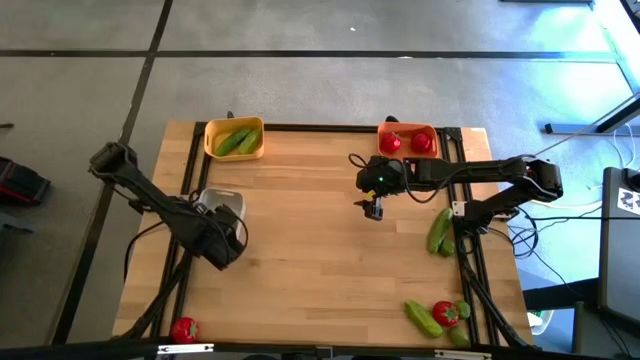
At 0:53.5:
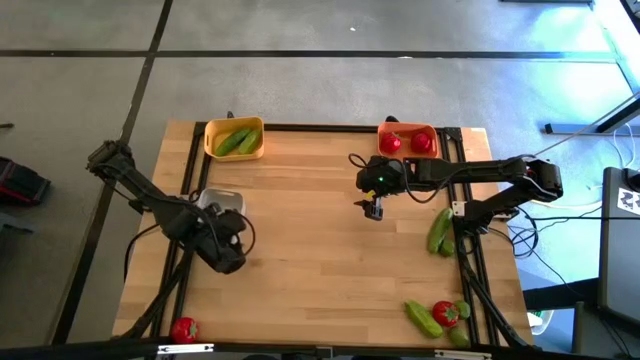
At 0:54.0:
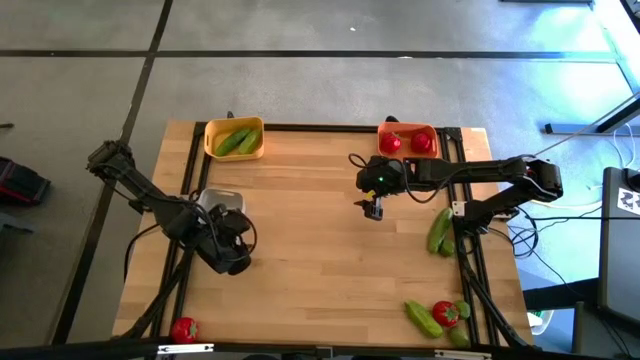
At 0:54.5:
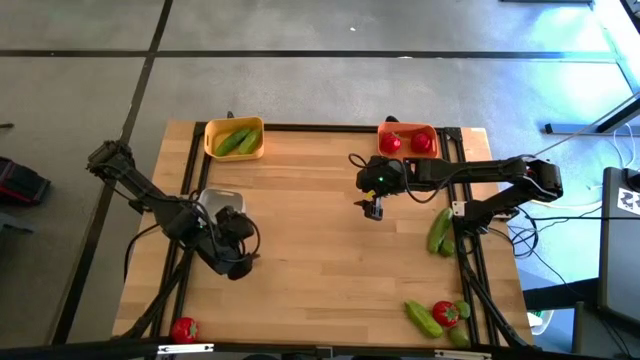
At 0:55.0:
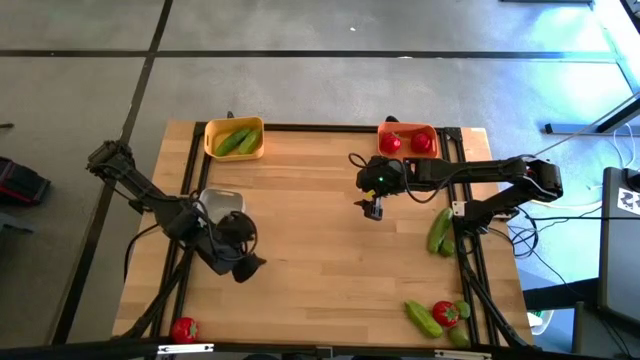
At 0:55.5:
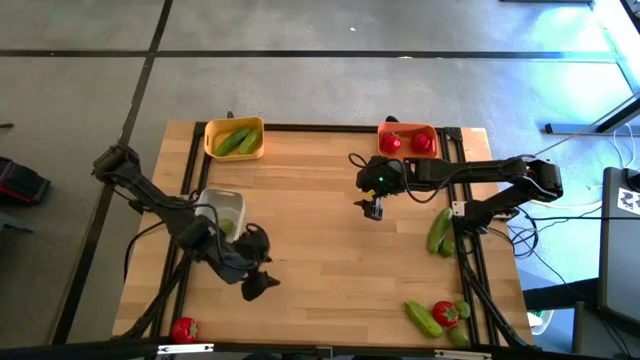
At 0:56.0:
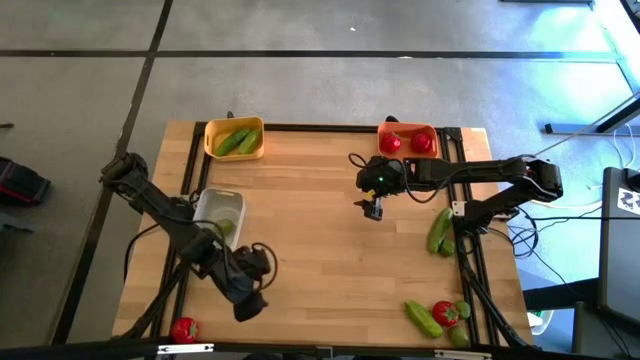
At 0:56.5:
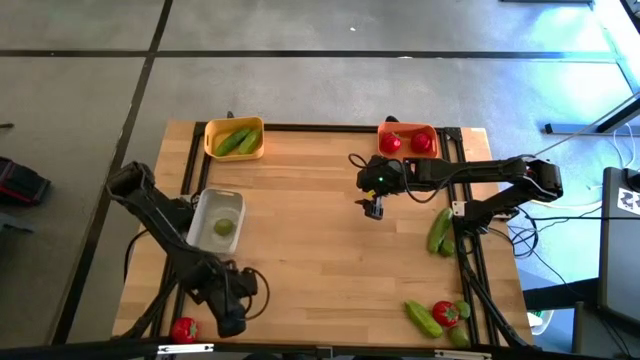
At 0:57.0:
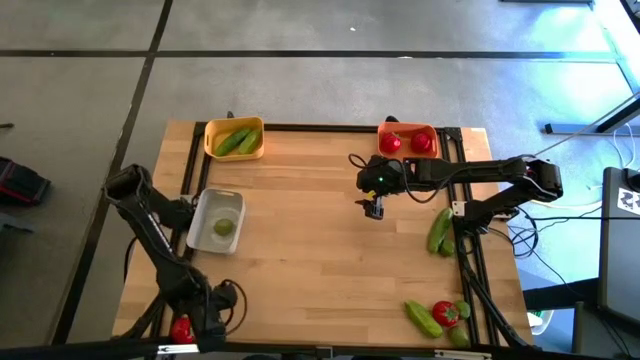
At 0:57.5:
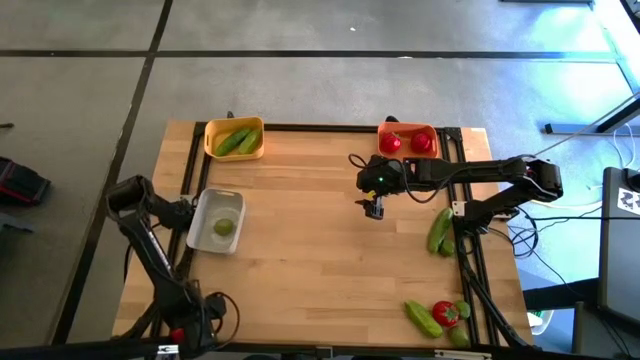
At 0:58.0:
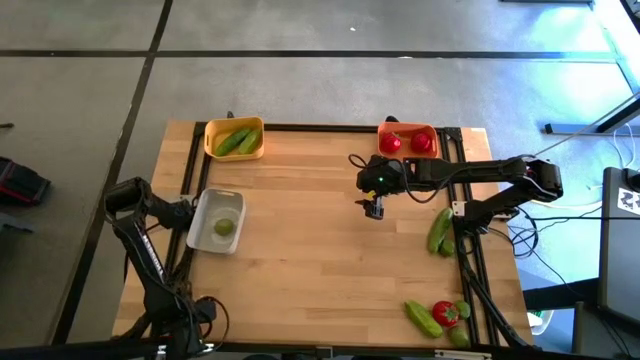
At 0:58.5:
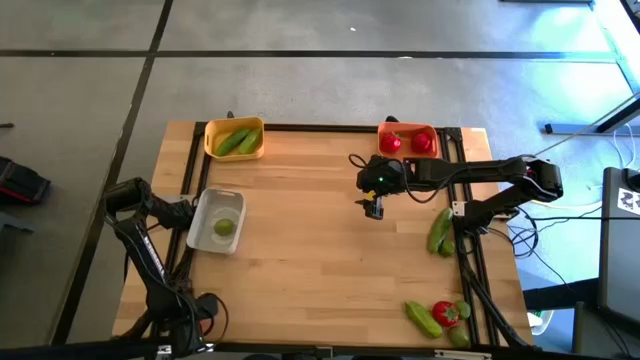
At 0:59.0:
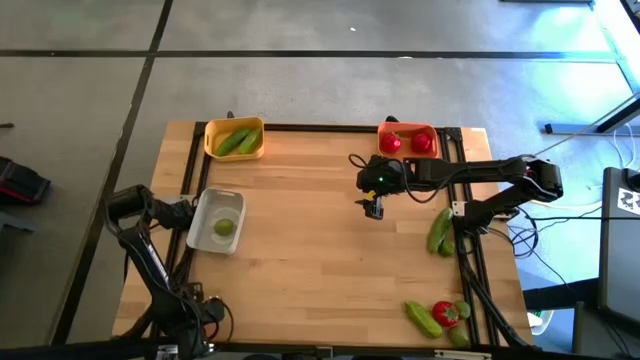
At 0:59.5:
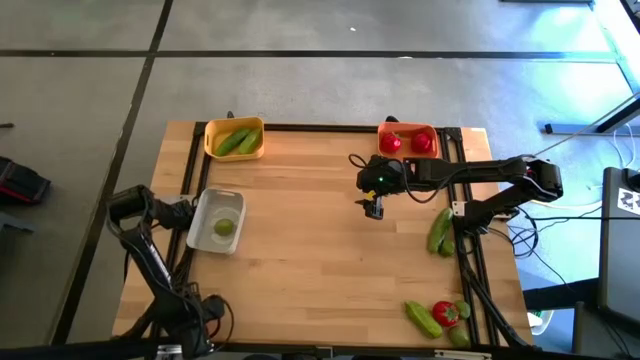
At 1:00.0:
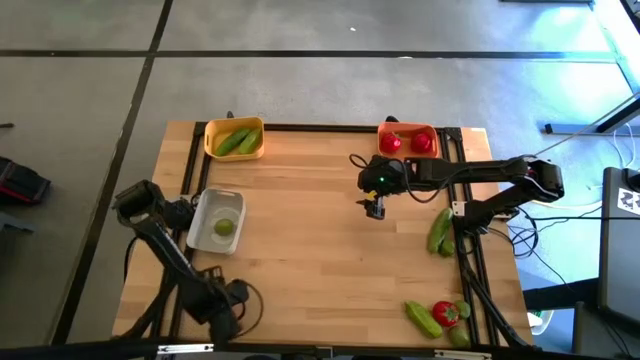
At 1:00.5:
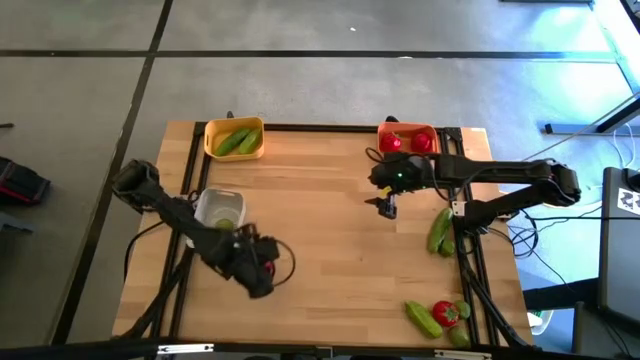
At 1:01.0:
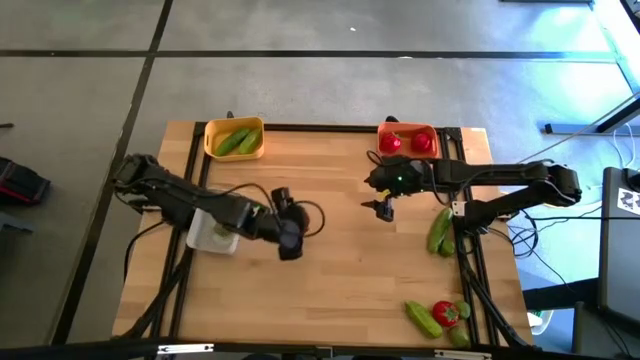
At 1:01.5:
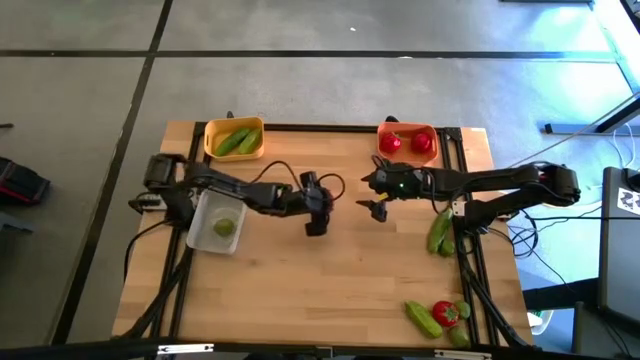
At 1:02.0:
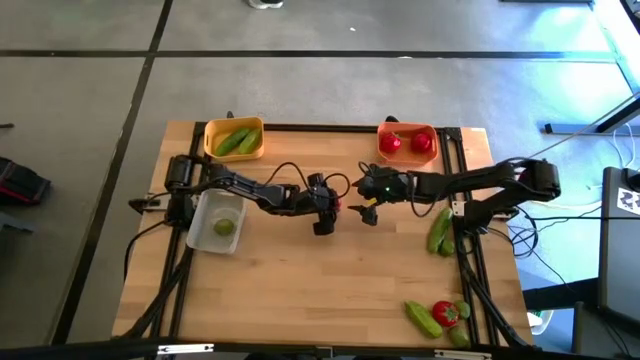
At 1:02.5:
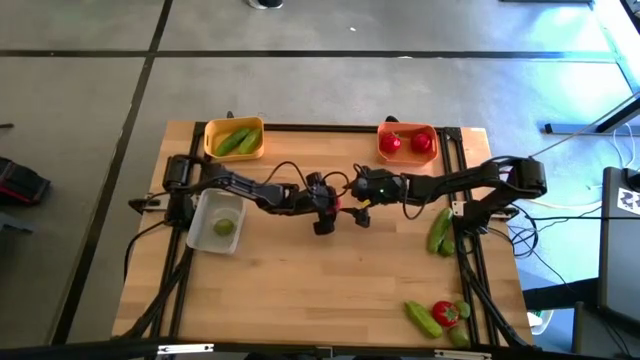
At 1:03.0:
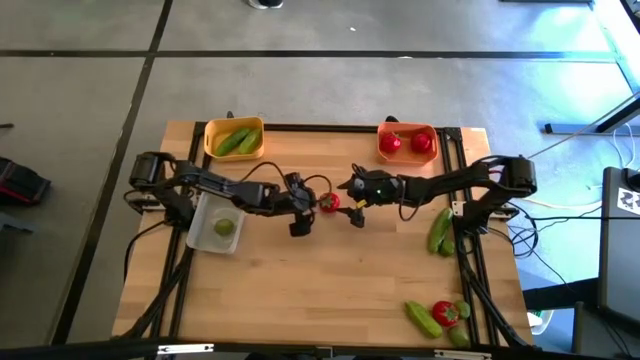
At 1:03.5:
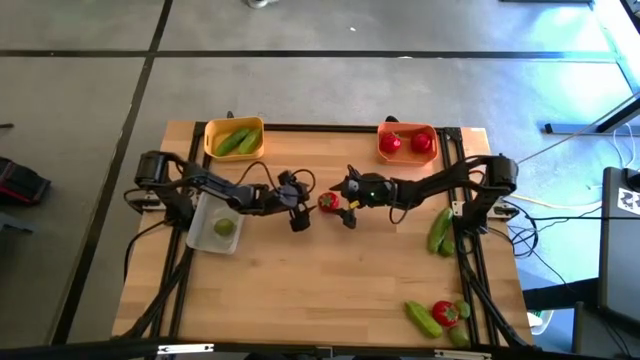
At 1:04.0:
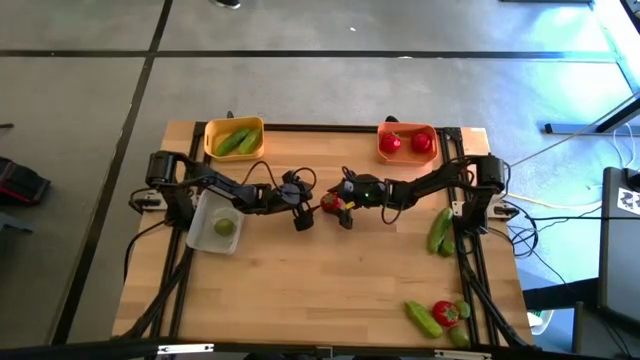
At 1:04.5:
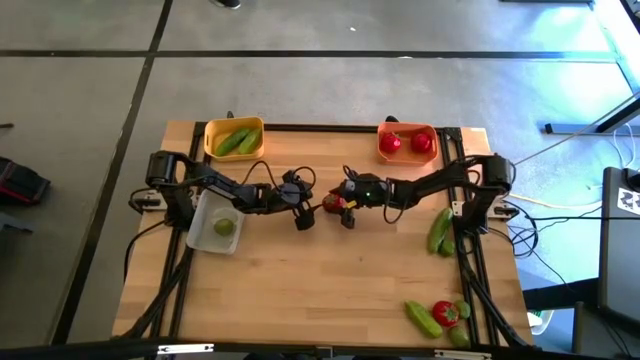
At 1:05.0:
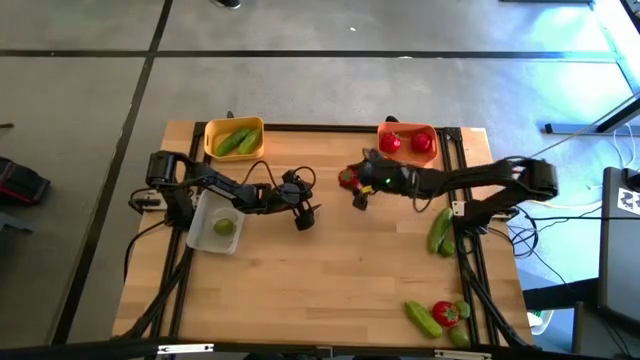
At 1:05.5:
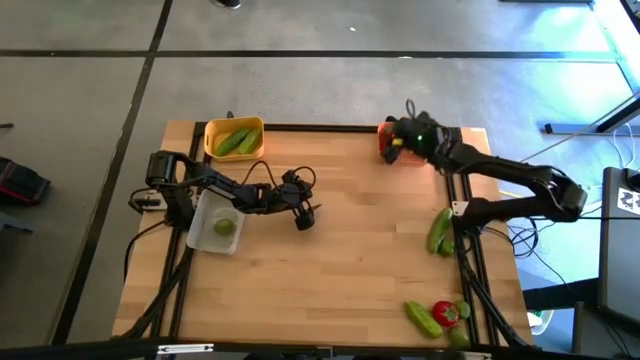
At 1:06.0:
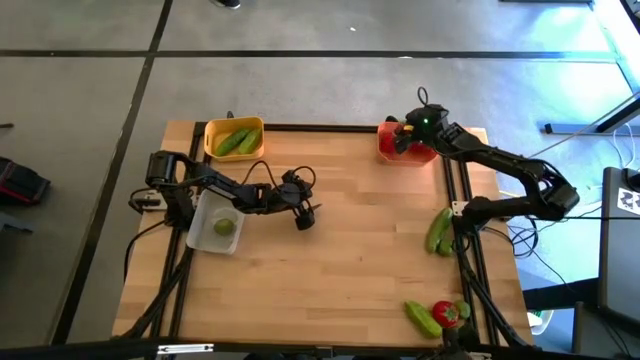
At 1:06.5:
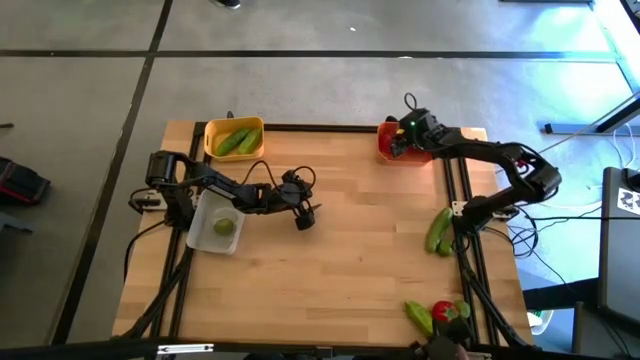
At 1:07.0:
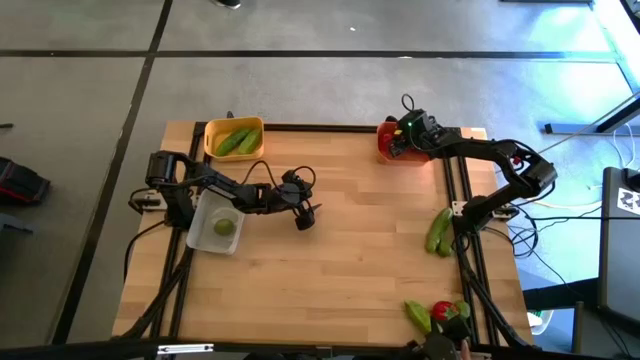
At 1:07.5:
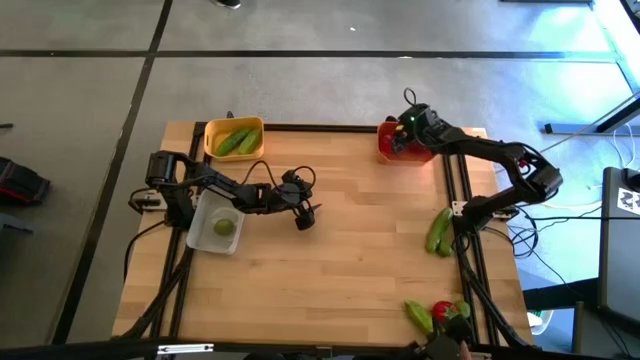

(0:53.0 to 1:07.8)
Task: Sort produce into baskets
Put the left red tomato into the orange bin

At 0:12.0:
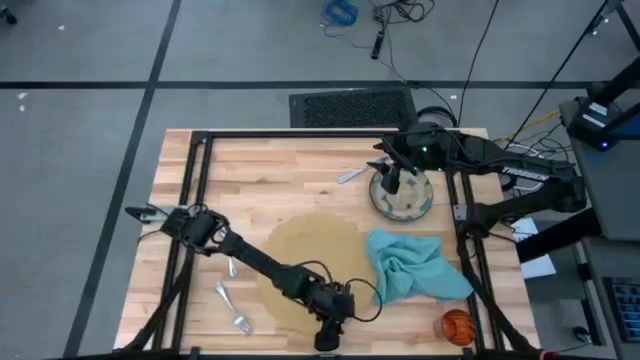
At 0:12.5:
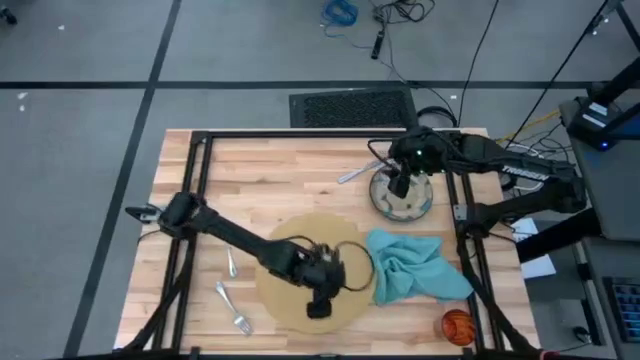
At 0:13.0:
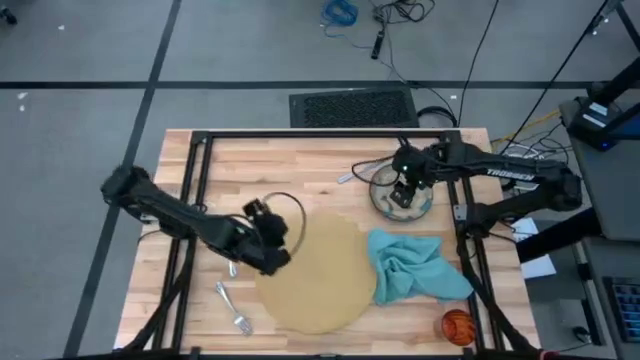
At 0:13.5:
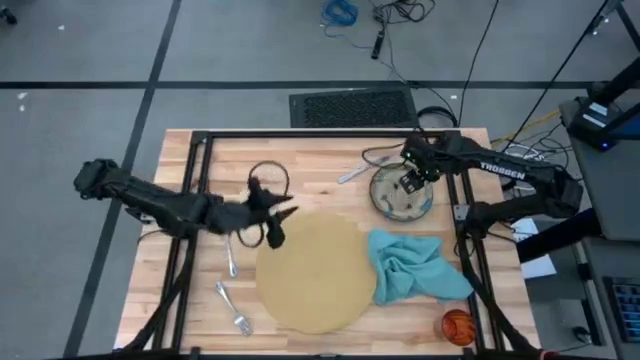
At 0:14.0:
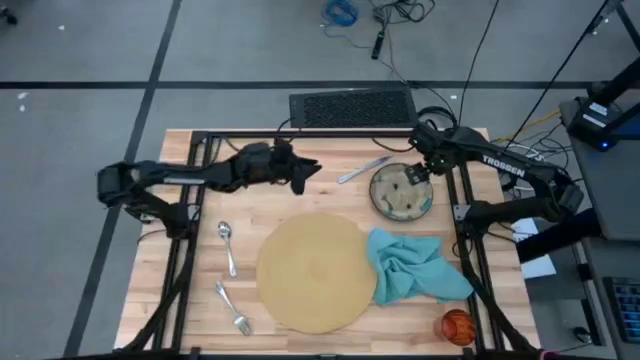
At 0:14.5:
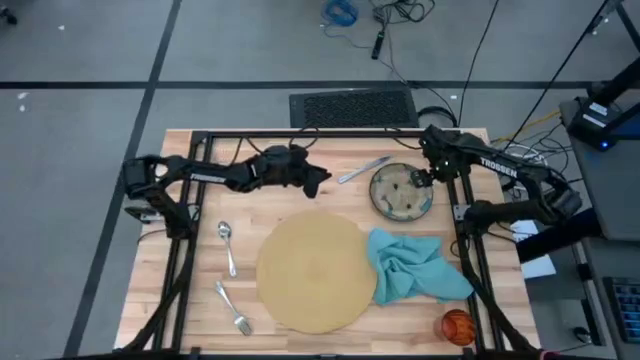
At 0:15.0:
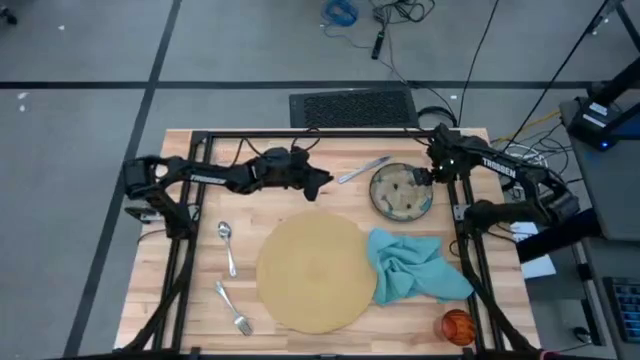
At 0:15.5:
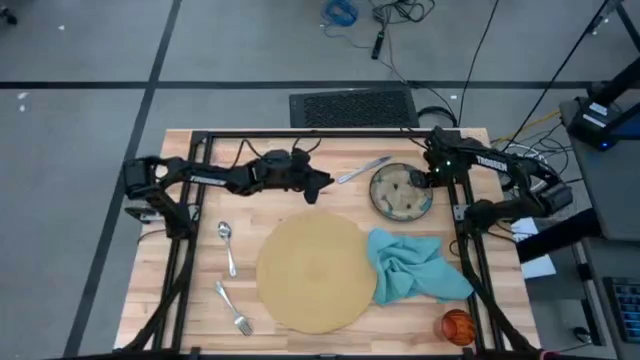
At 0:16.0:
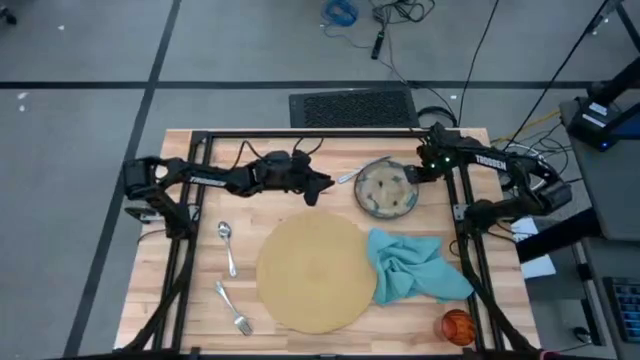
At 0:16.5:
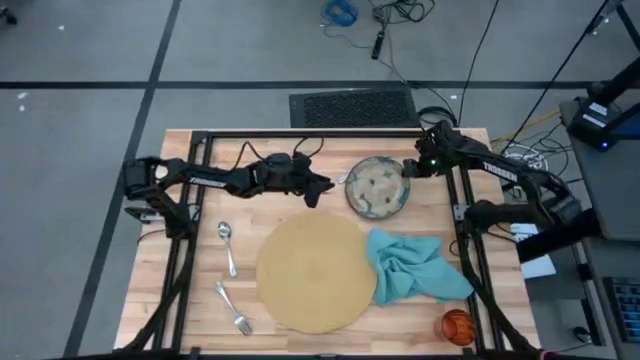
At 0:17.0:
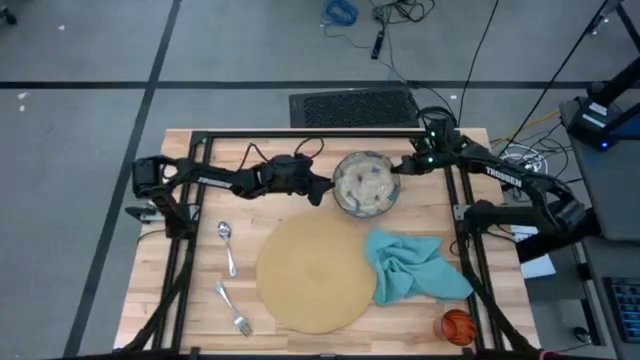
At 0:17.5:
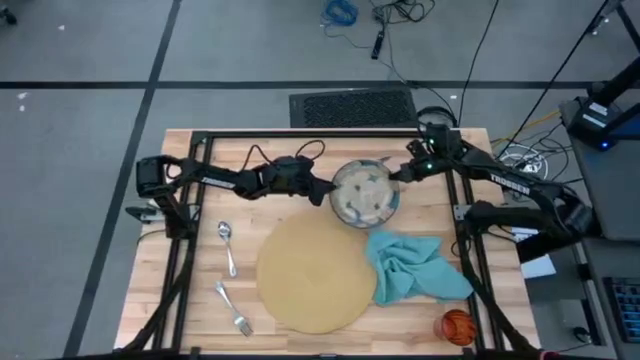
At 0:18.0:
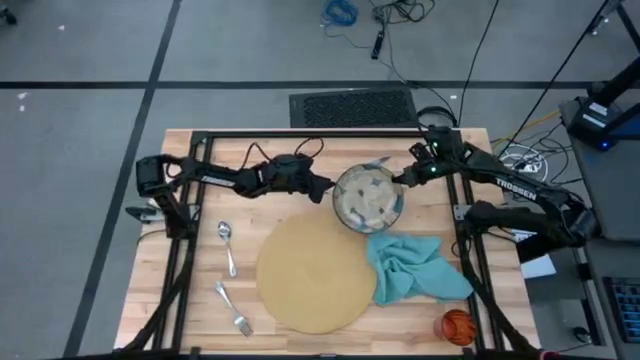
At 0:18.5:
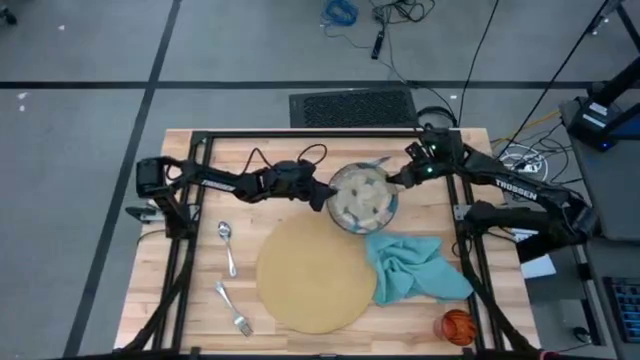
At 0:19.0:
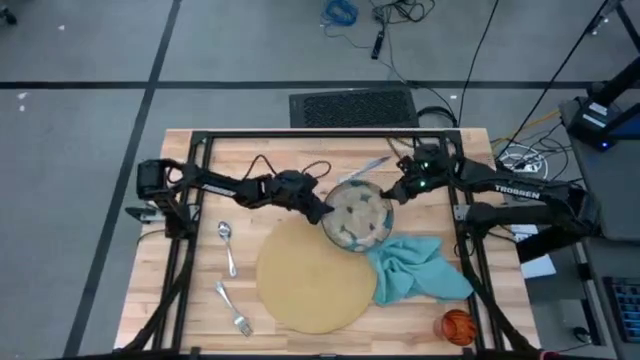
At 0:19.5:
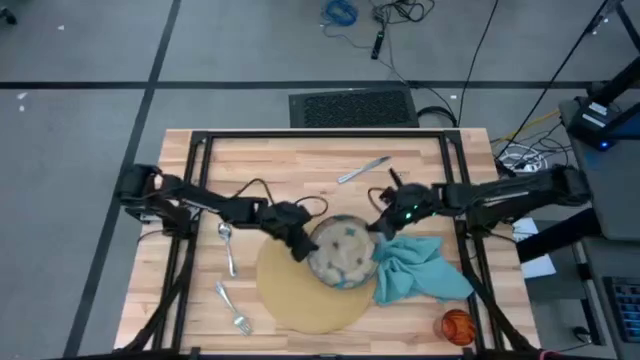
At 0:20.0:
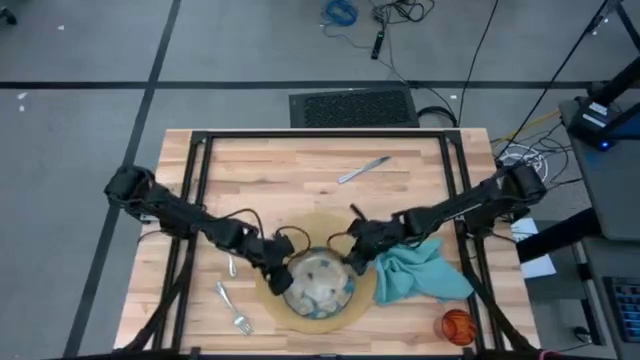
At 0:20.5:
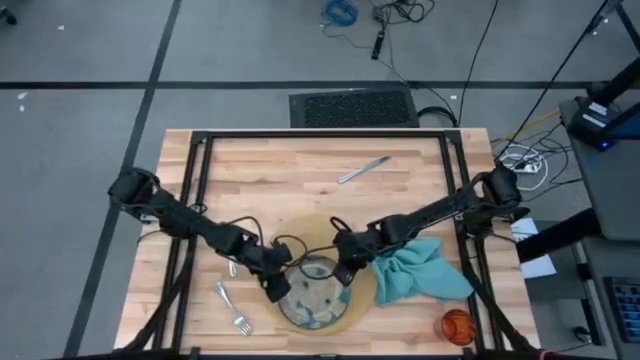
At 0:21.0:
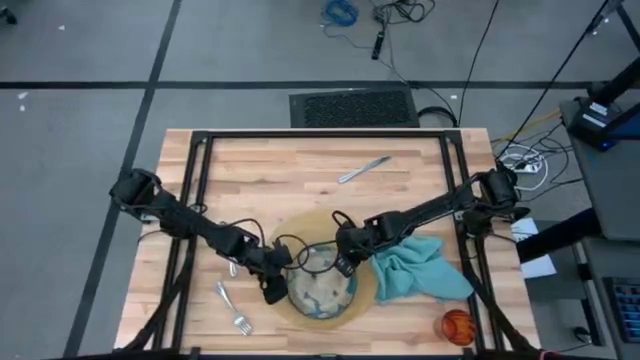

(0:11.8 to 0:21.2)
Task: Set table place
Put the blue patterned plate on the brown mat
